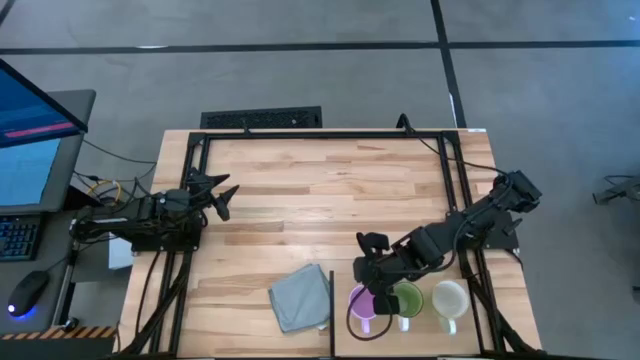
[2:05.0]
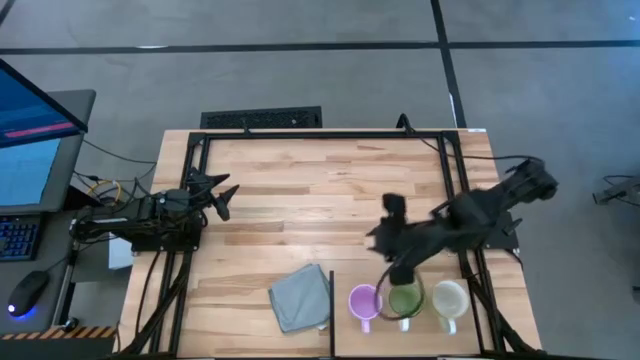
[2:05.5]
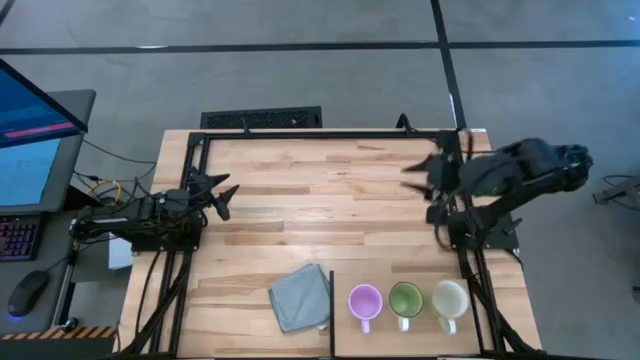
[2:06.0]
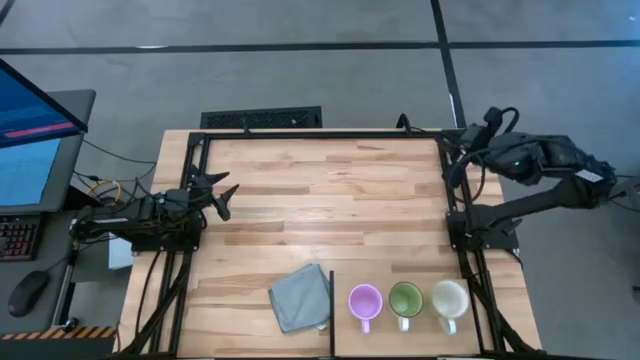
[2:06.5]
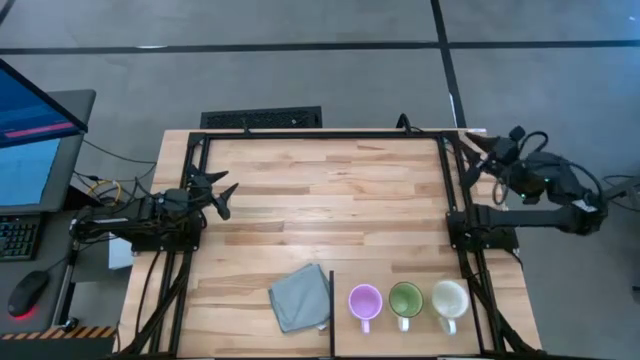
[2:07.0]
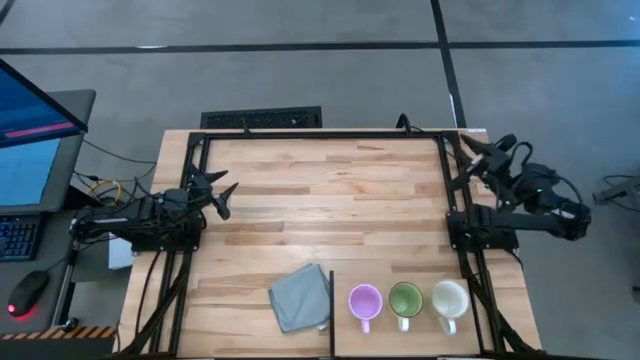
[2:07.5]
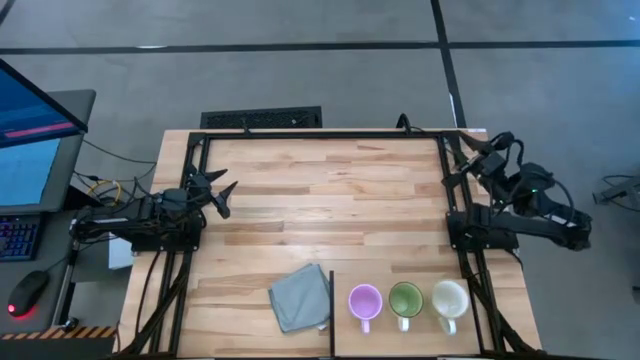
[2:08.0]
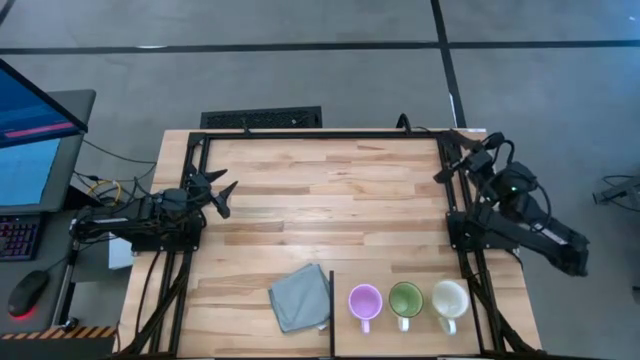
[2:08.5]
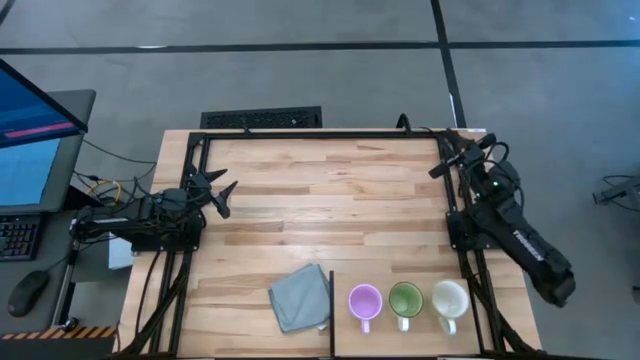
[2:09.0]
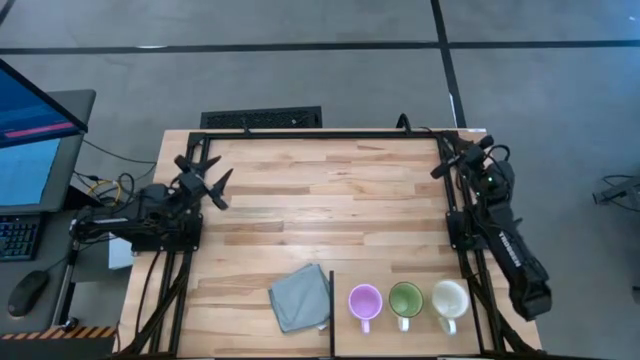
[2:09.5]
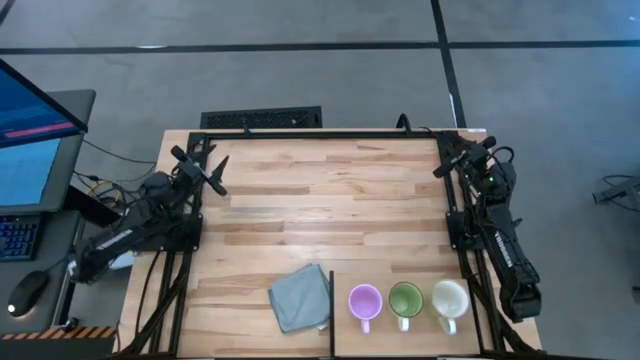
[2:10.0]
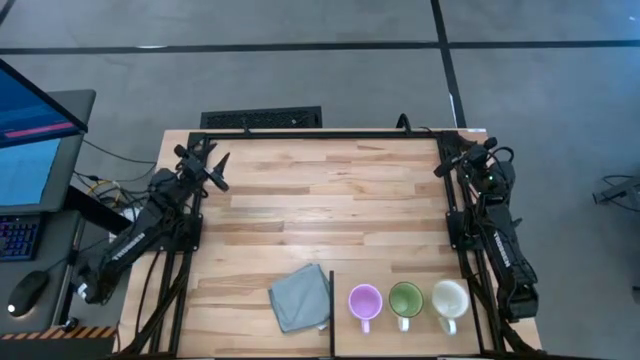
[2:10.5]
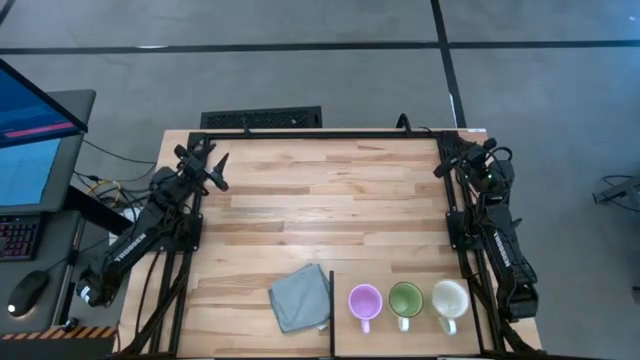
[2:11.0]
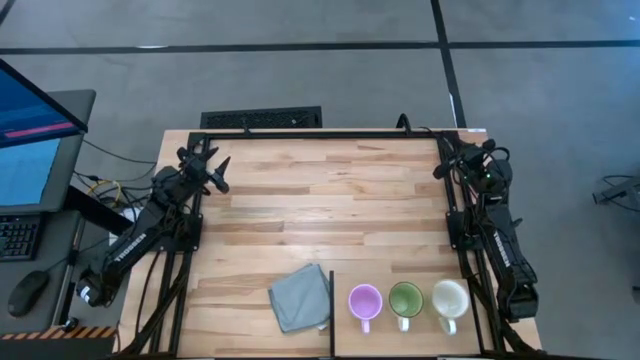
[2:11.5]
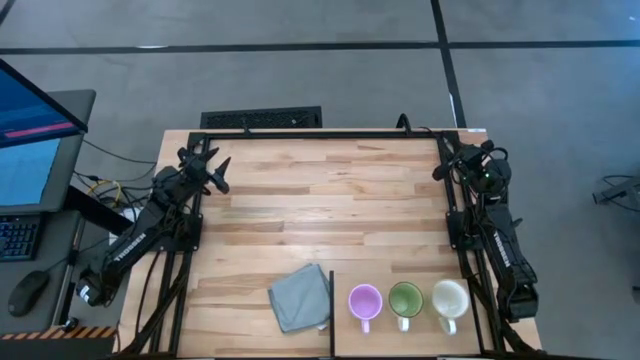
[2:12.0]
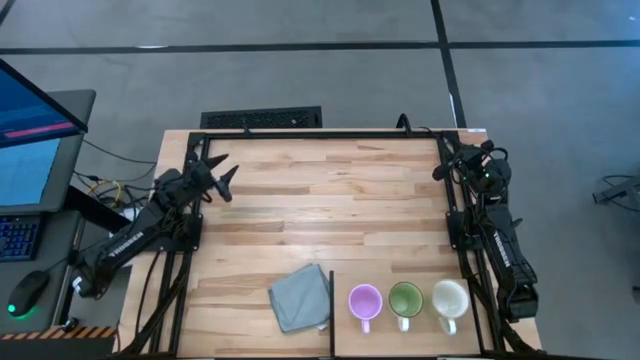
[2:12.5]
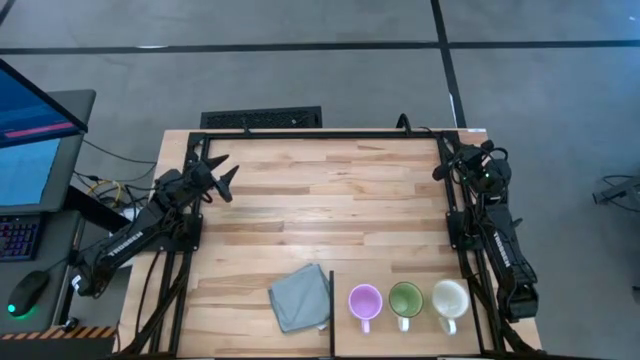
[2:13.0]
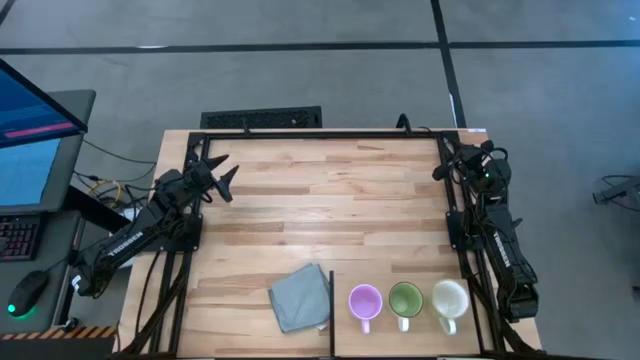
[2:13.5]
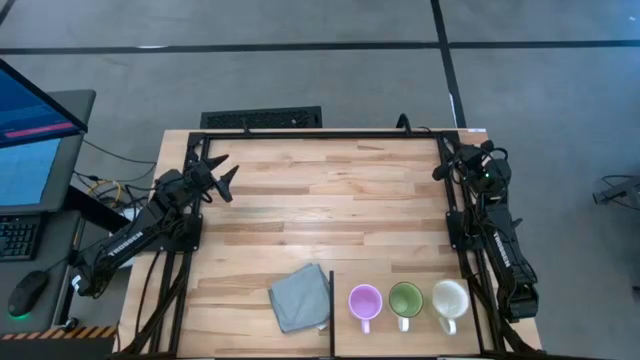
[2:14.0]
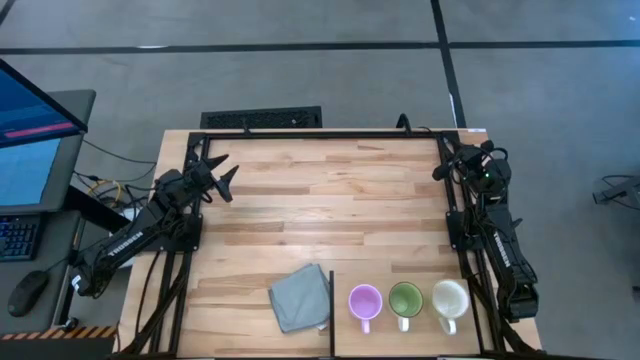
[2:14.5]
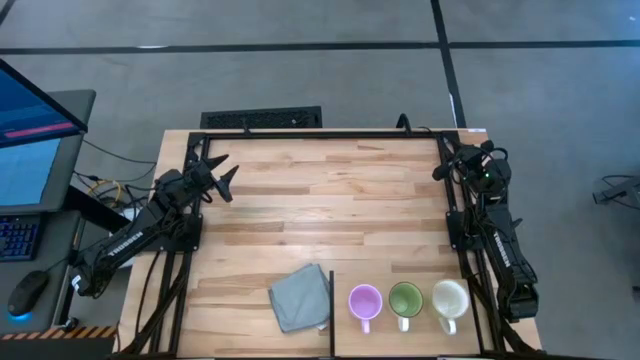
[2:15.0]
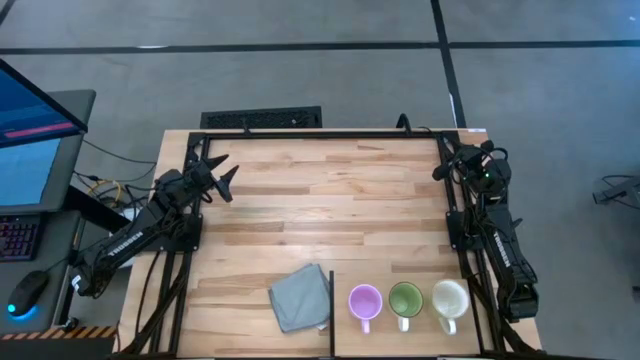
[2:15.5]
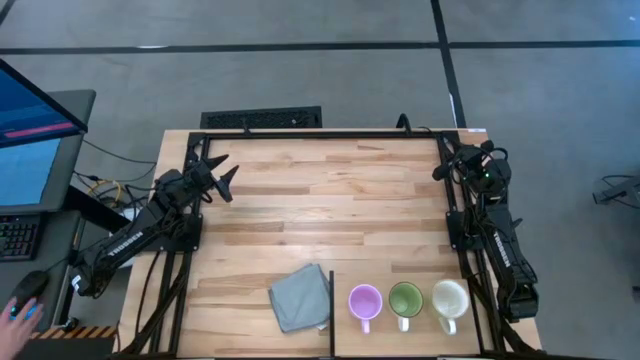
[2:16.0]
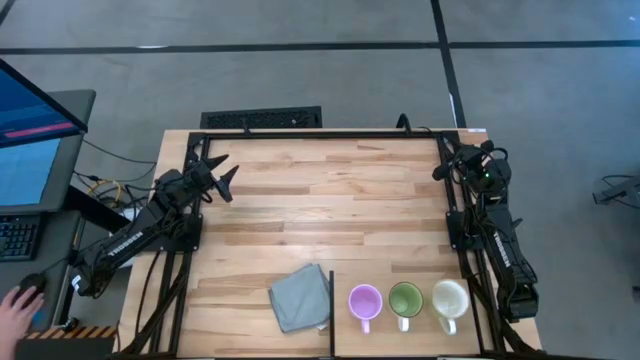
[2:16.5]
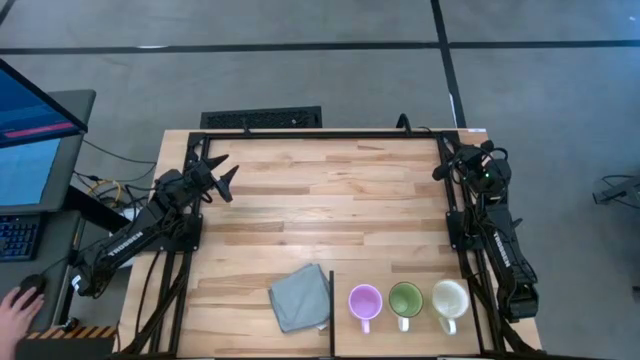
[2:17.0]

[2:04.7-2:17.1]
Task: Stack small to large cups/mugs on shelf
Return to Home Position

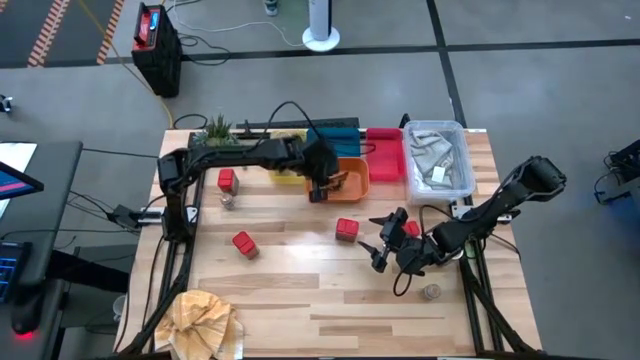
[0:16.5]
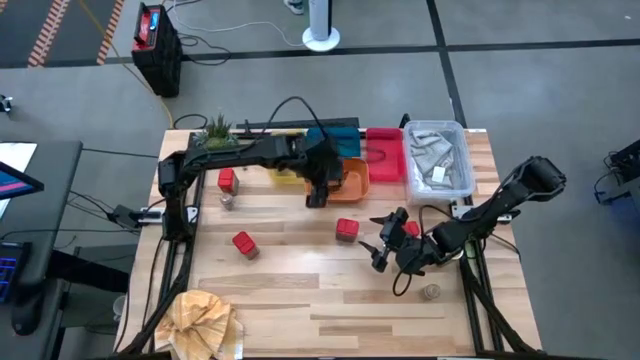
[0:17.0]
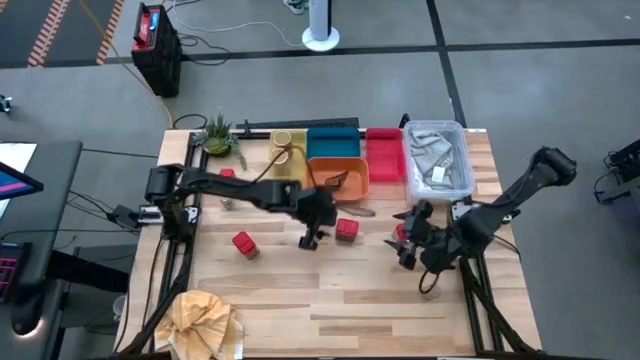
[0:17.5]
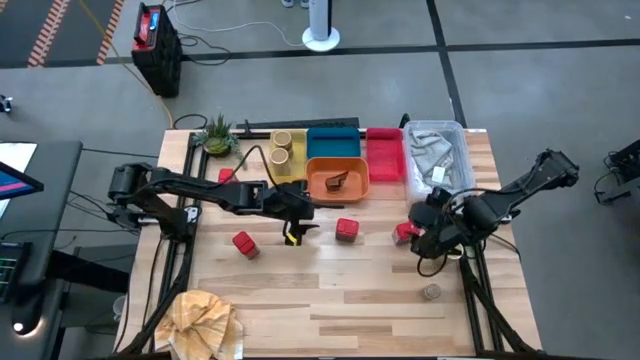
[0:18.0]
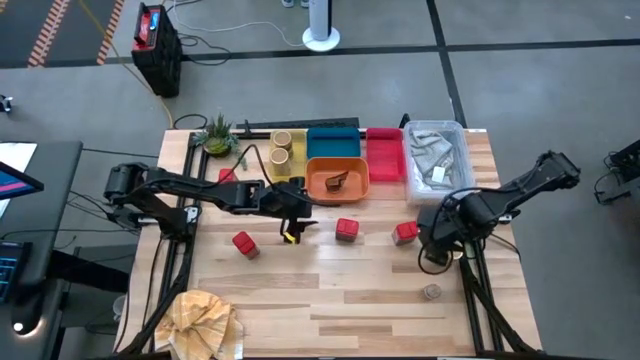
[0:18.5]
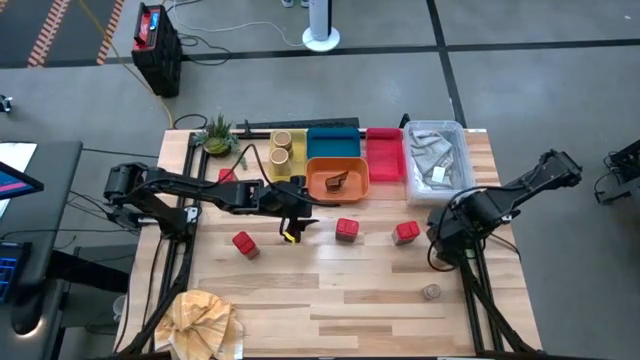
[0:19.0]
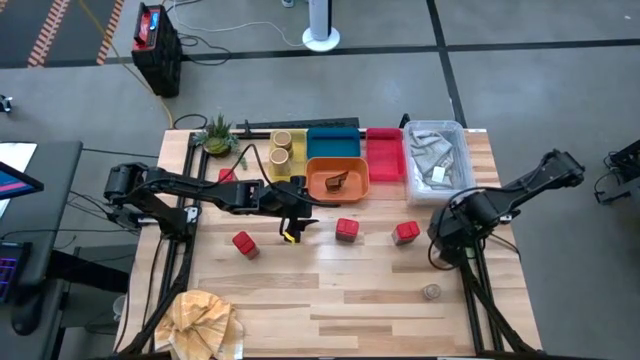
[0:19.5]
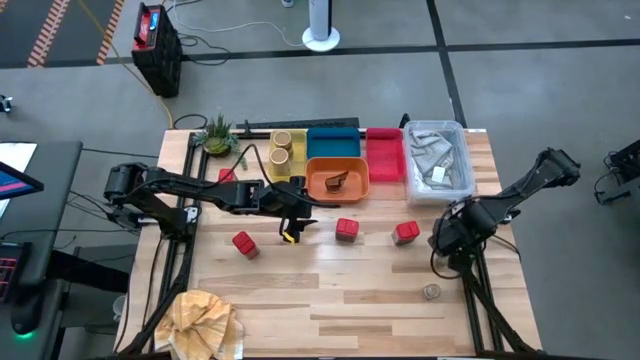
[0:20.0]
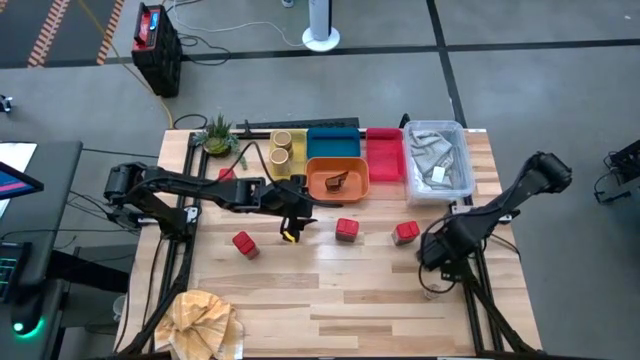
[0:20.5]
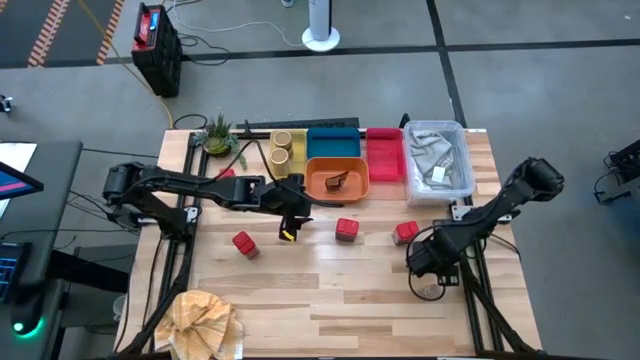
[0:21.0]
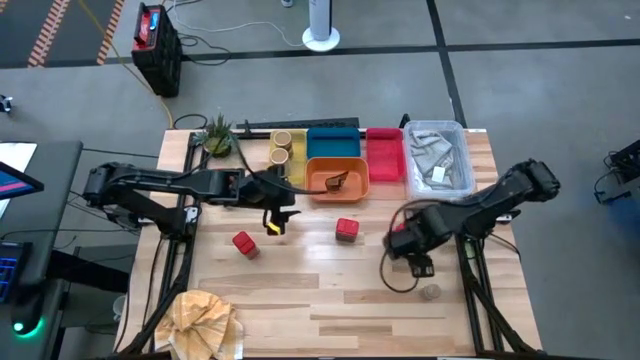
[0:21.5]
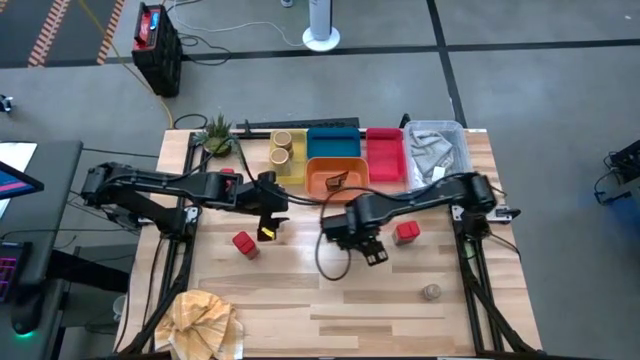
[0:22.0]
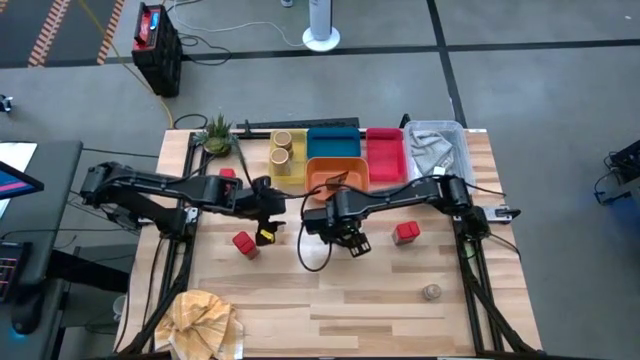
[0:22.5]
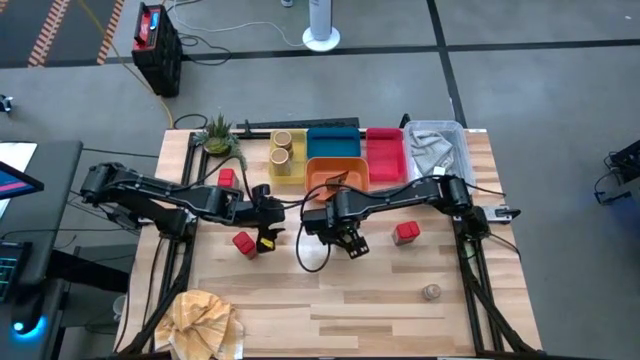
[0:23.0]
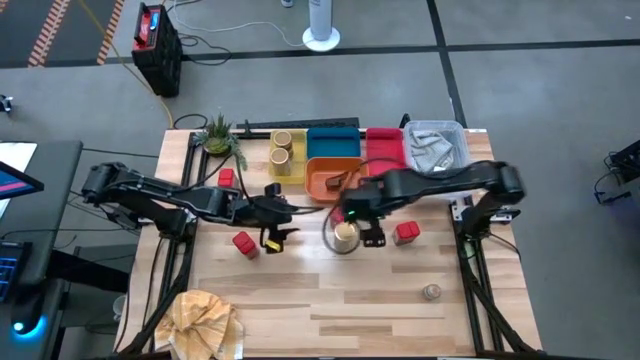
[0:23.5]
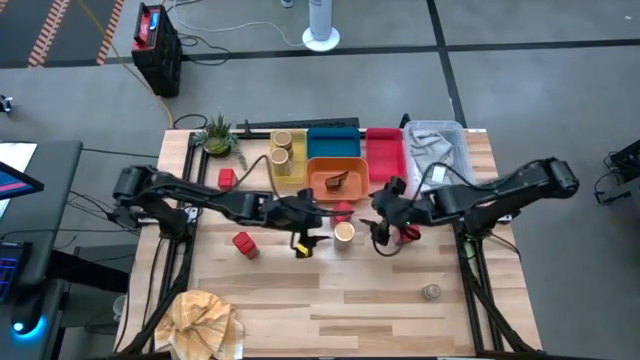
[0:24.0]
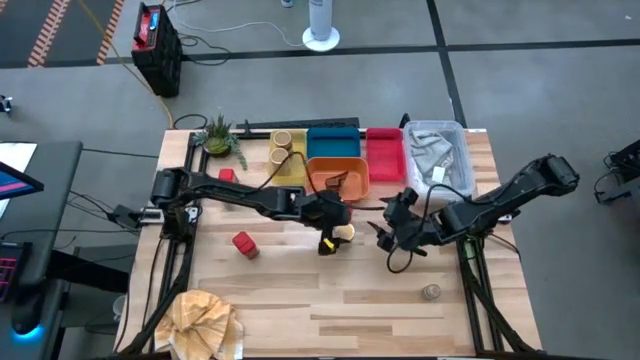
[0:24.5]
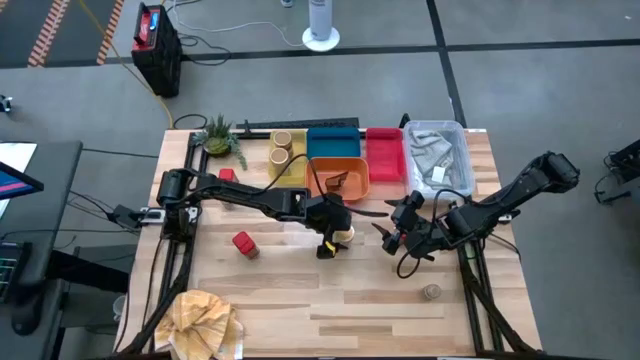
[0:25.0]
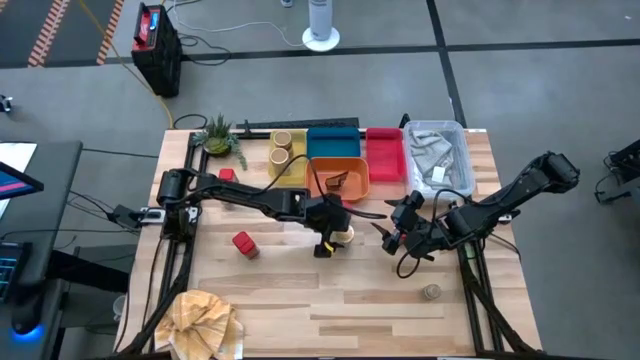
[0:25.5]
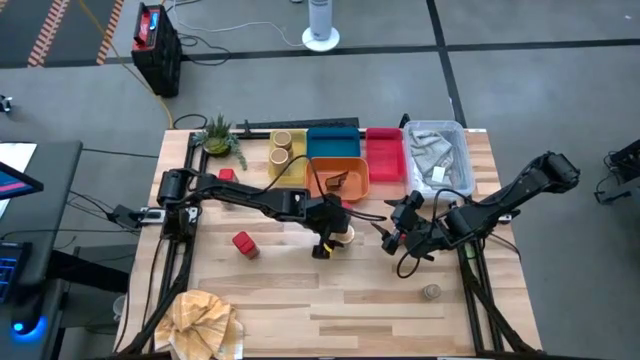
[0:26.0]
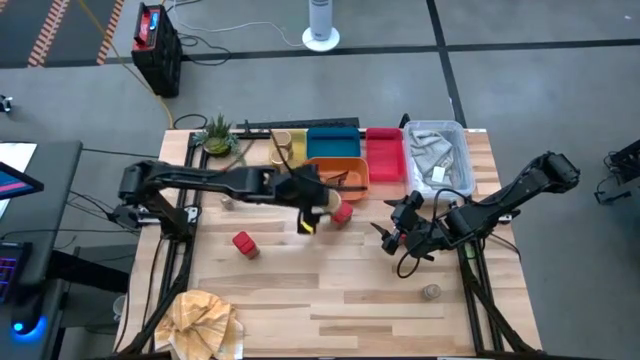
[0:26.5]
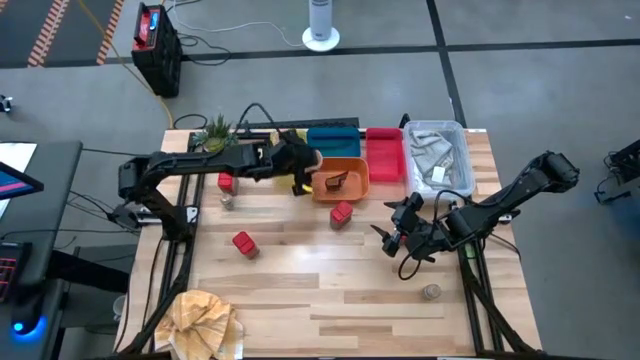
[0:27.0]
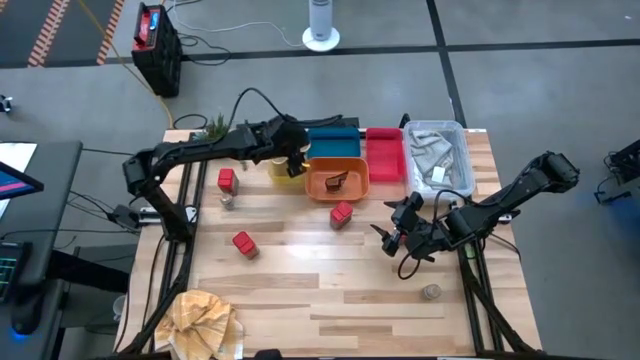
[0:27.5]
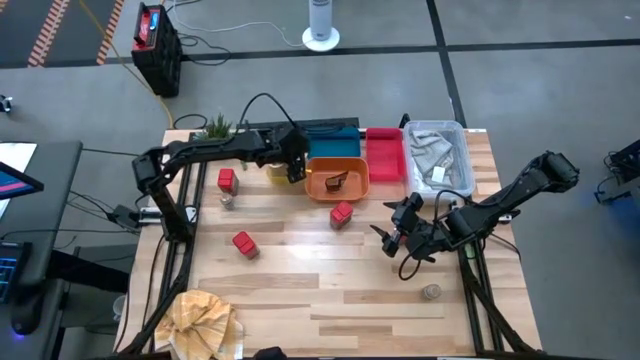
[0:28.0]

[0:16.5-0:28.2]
Task: Sort spices by type
Put the gold seasoning bottle into the yellow bin
